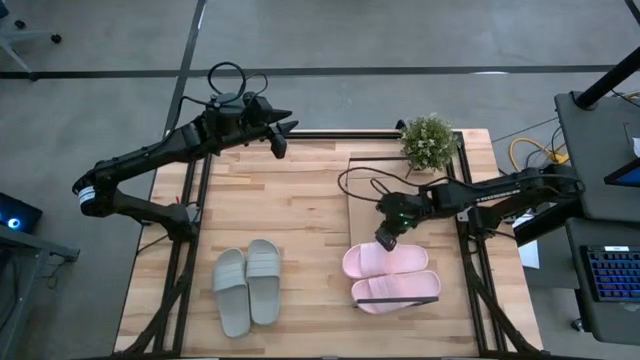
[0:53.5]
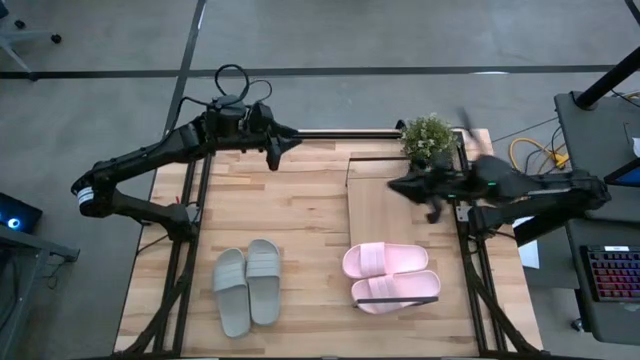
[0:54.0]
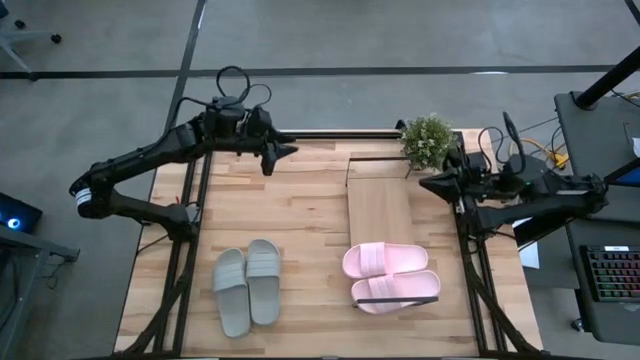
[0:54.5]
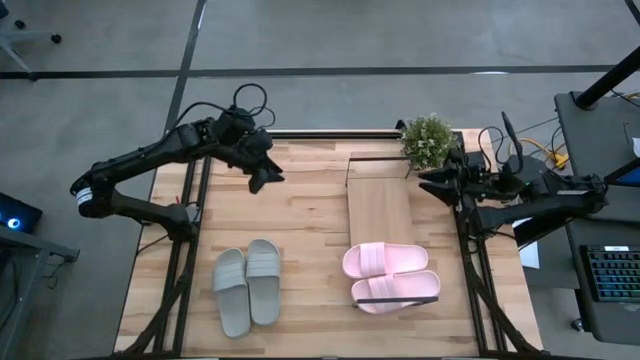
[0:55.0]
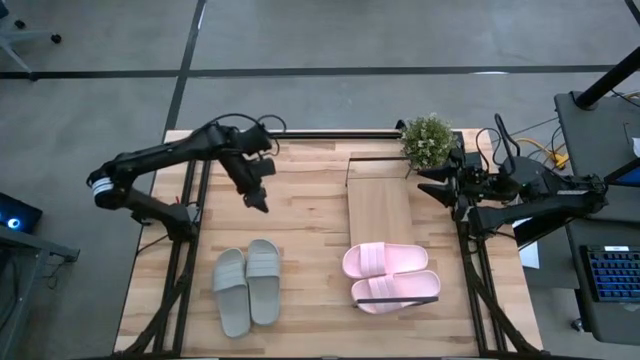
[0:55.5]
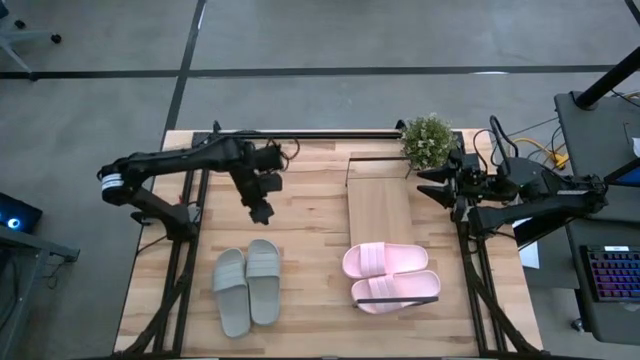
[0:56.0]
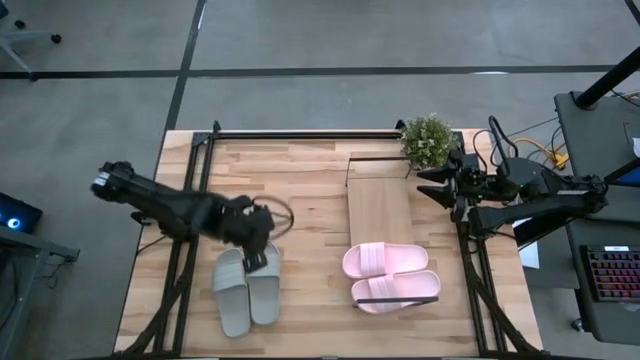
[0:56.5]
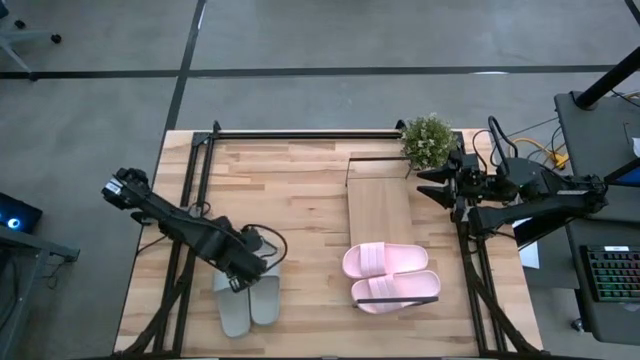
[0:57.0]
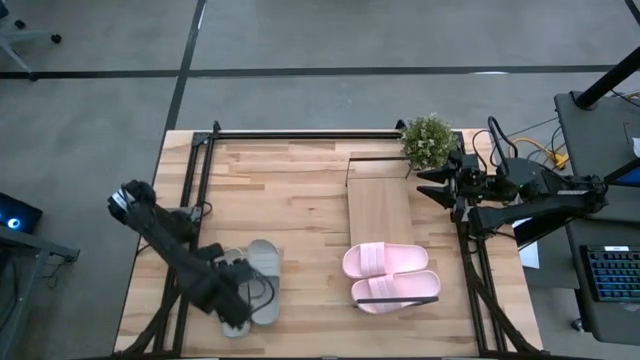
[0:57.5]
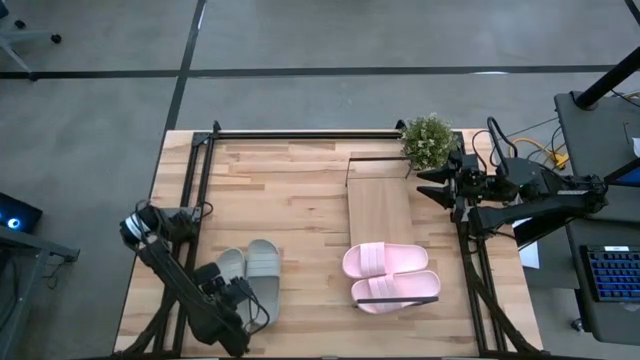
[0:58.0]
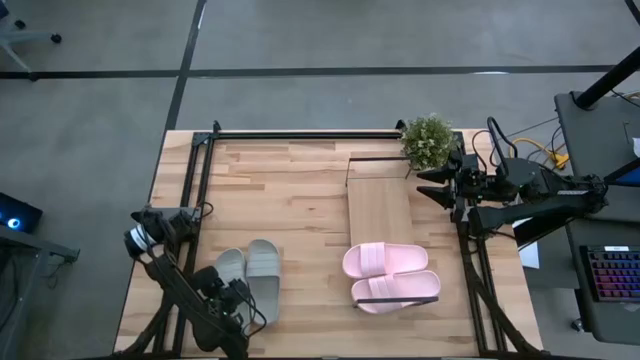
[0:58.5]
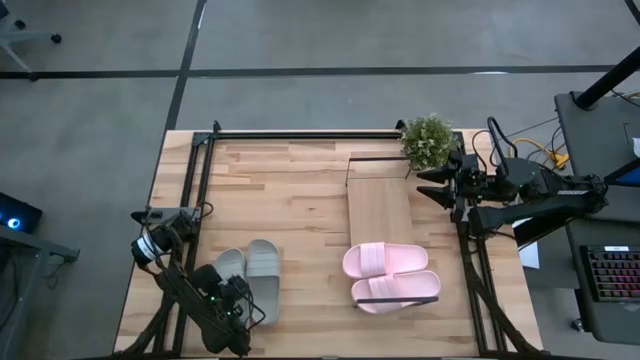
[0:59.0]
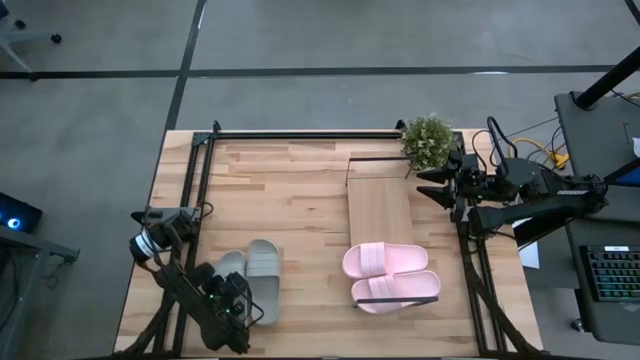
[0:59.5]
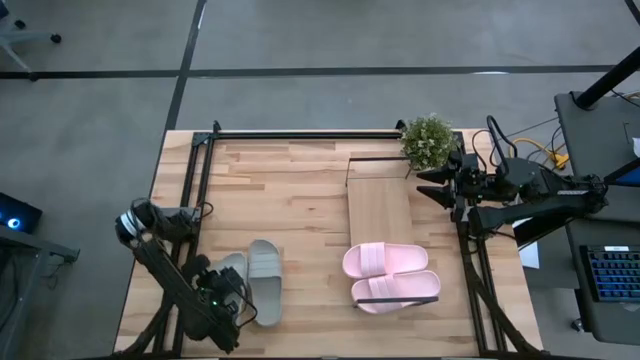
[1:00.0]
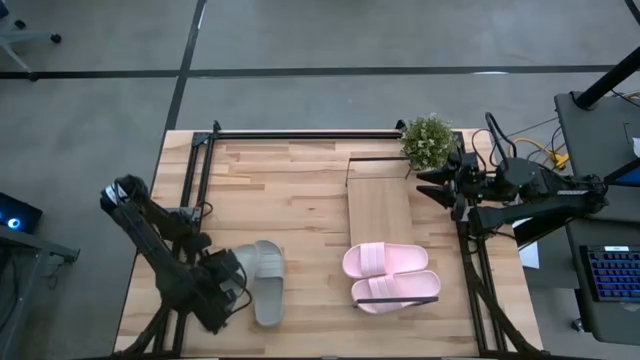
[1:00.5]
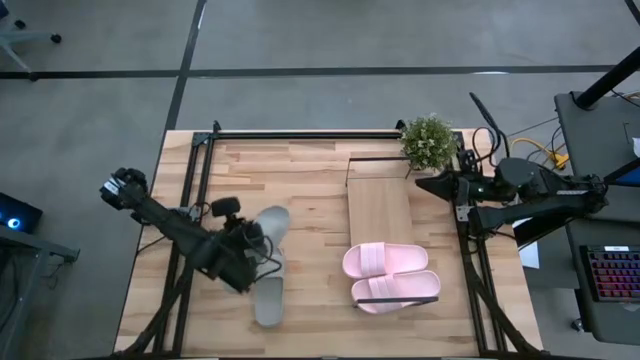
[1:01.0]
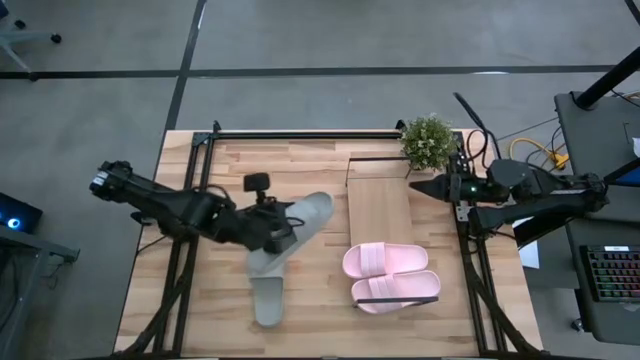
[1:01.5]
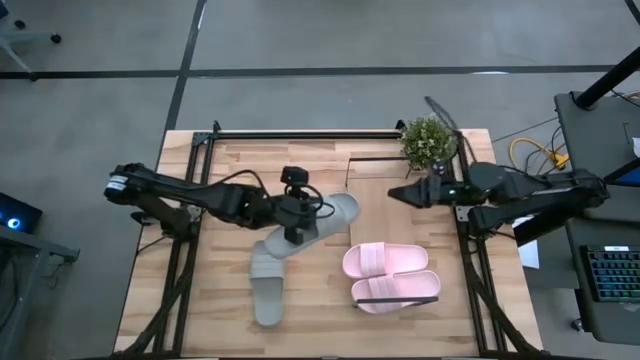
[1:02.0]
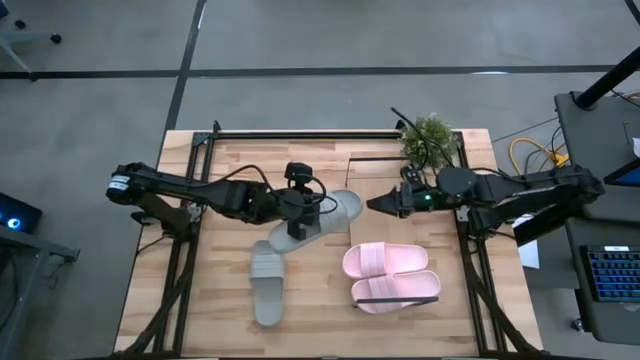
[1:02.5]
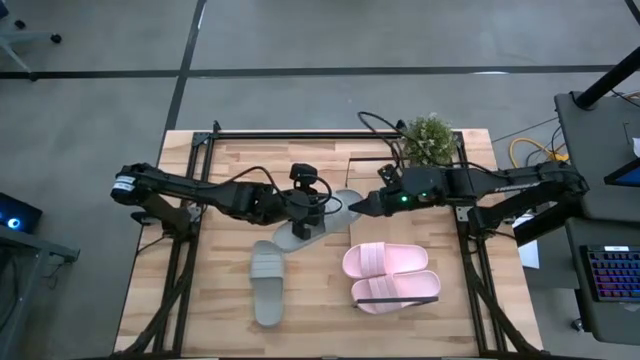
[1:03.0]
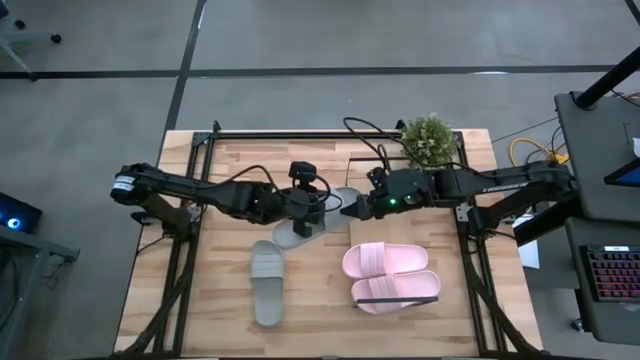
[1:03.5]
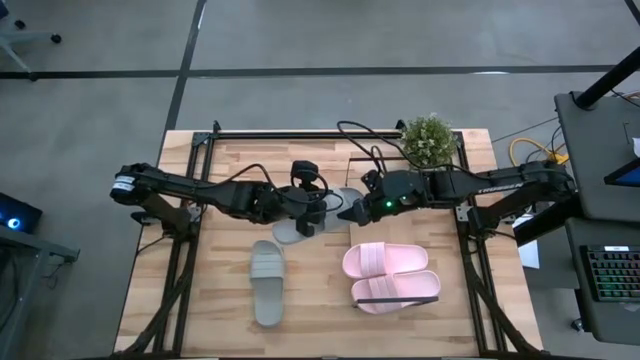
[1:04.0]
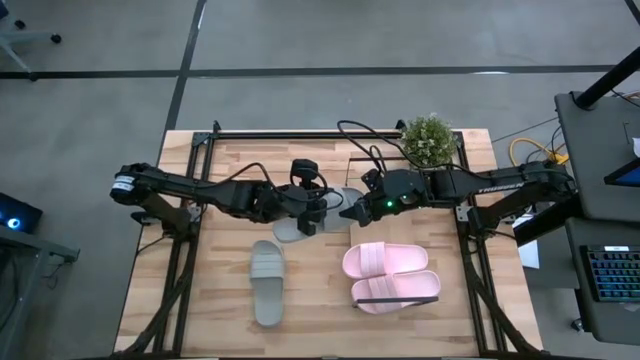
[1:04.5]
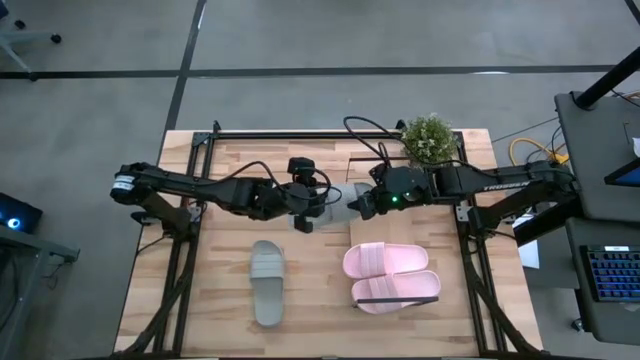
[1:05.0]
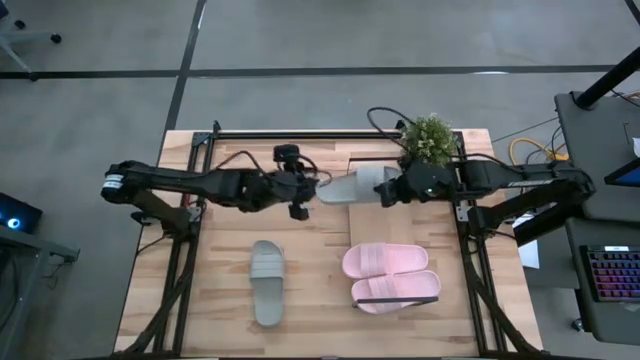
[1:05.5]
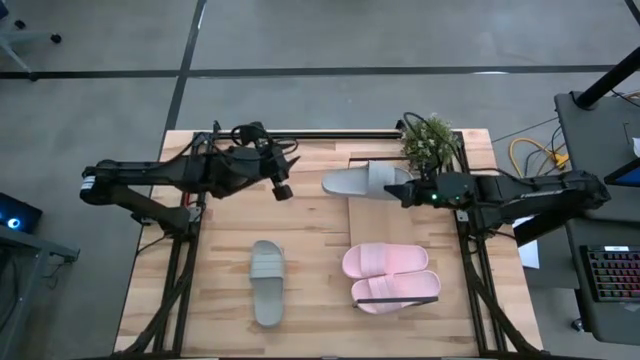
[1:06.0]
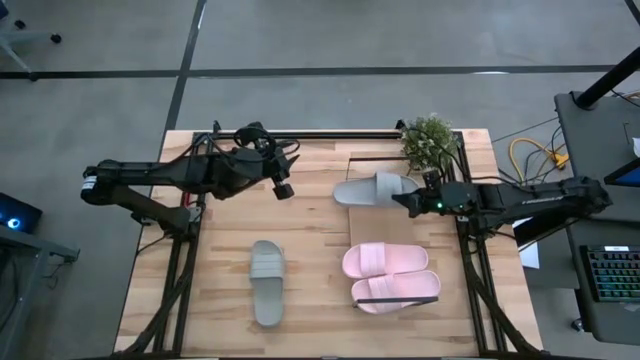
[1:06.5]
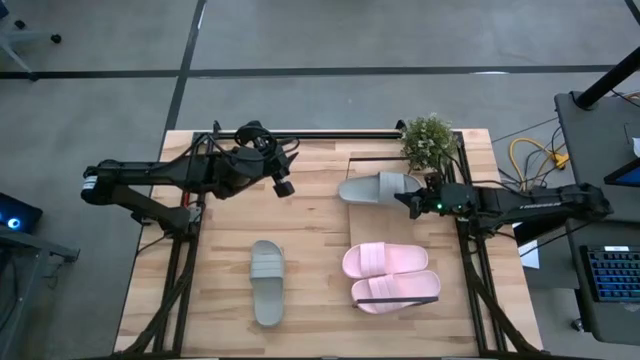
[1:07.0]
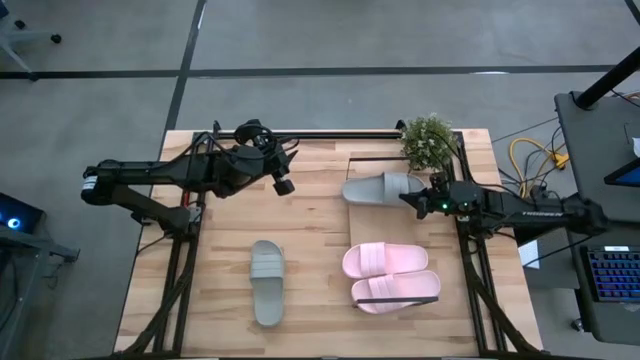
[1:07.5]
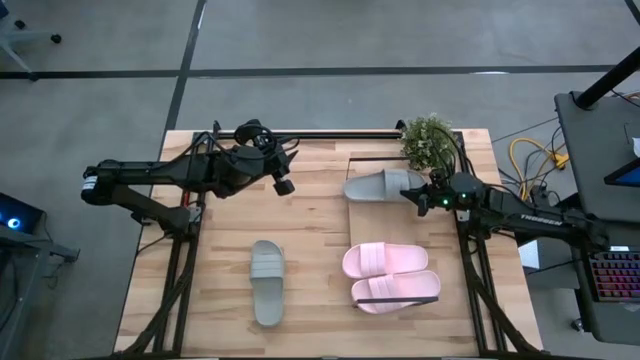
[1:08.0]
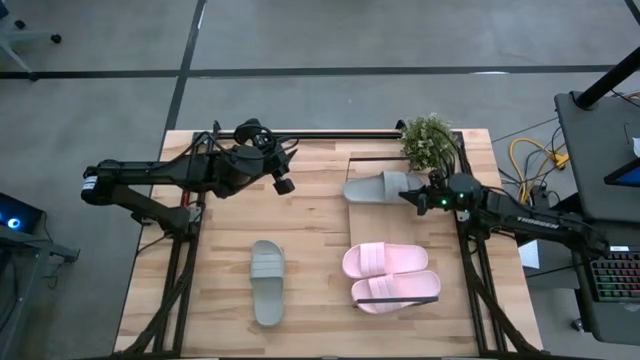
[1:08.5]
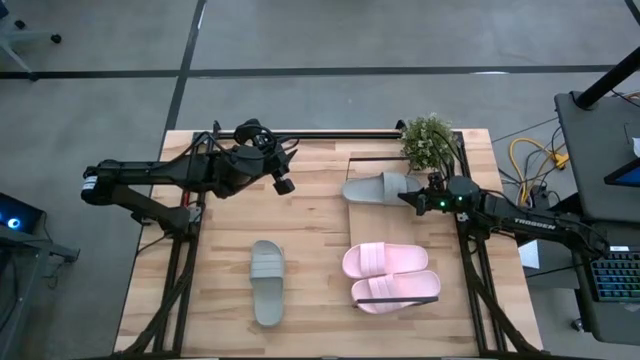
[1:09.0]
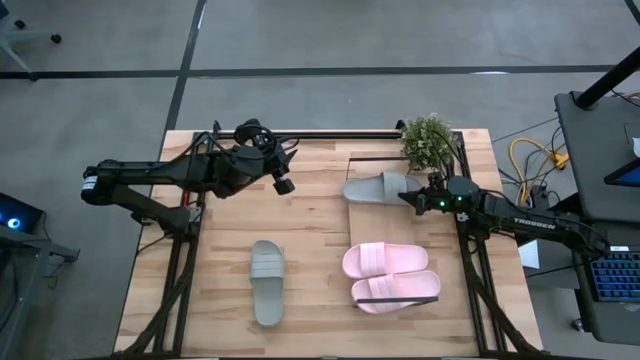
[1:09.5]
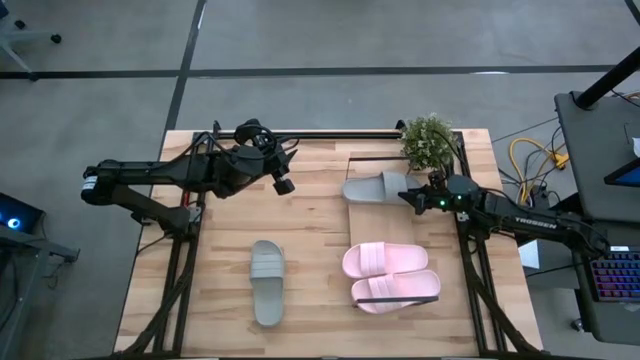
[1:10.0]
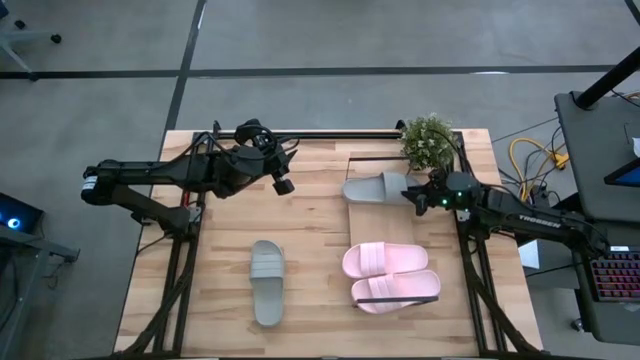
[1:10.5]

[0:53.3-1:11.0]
Task: Pick and place slides into the shelf
Put the left gray slide on the shelf

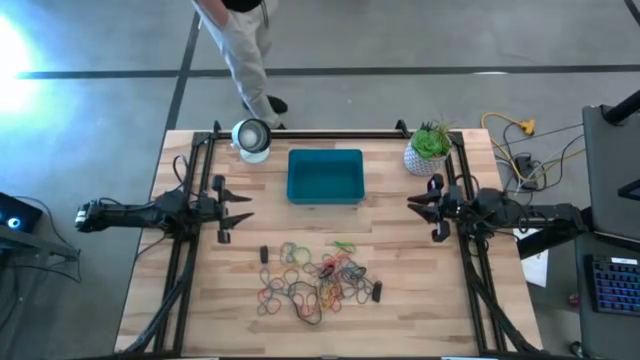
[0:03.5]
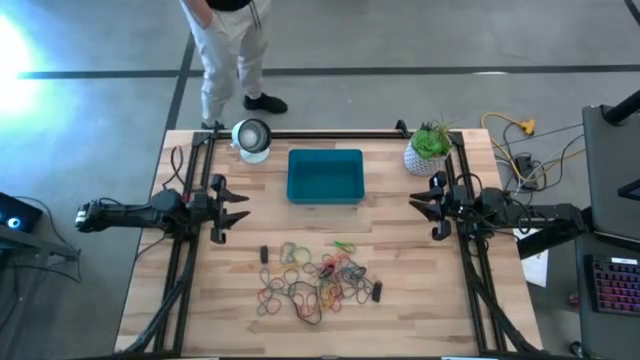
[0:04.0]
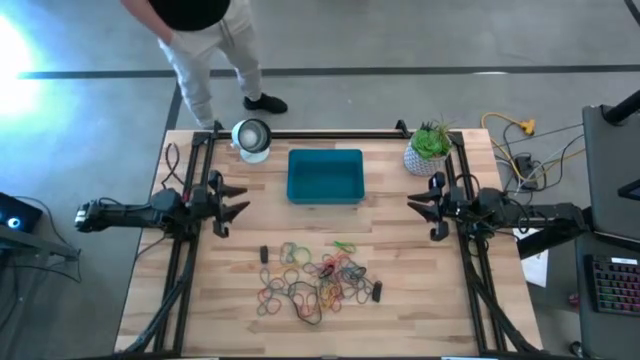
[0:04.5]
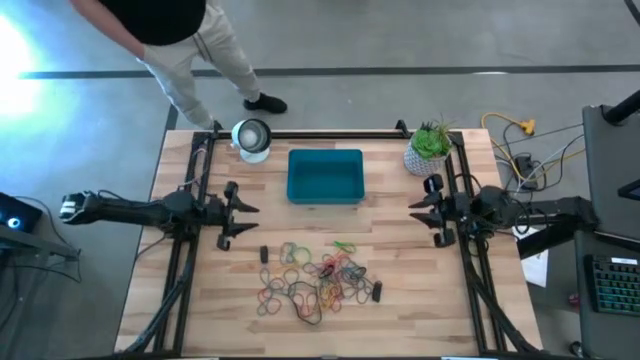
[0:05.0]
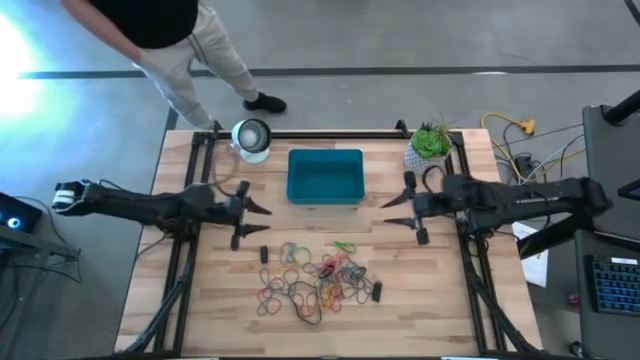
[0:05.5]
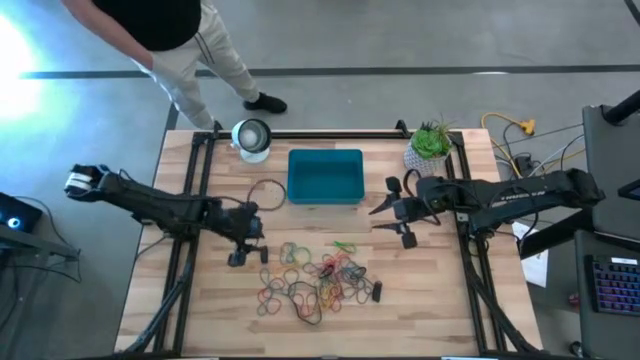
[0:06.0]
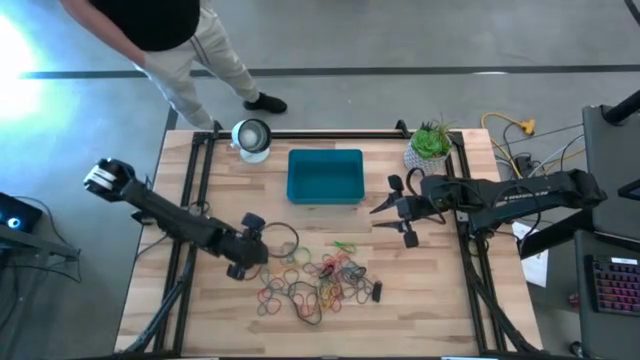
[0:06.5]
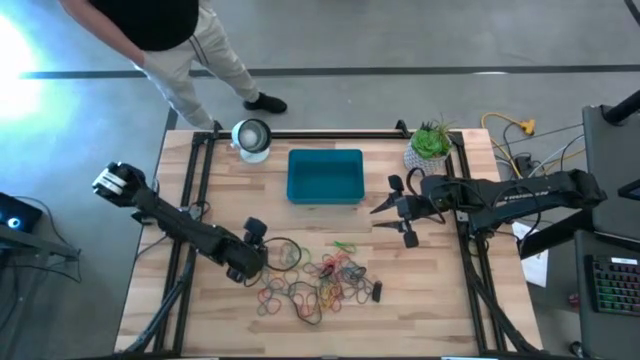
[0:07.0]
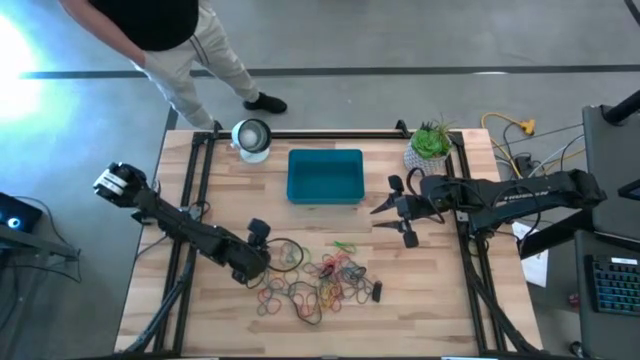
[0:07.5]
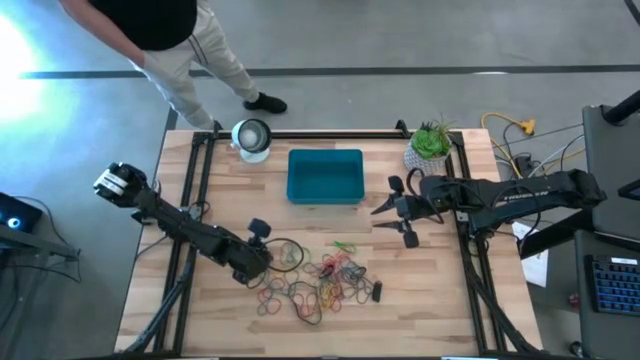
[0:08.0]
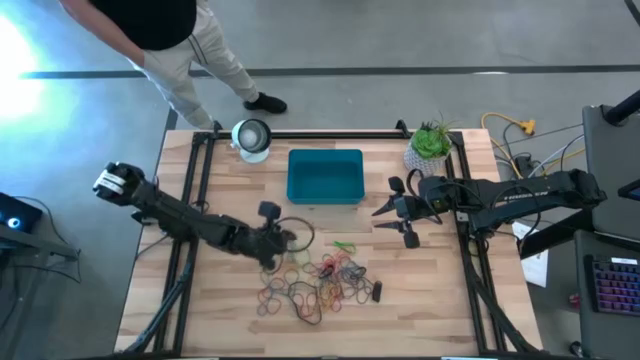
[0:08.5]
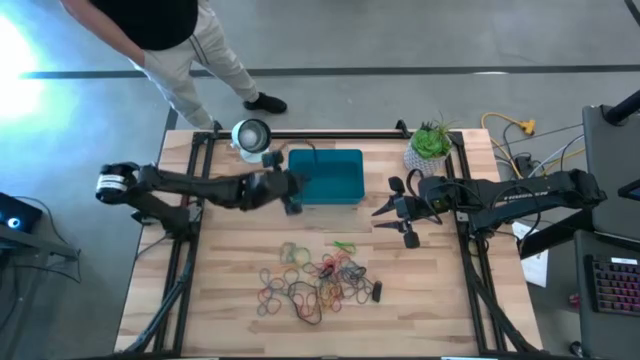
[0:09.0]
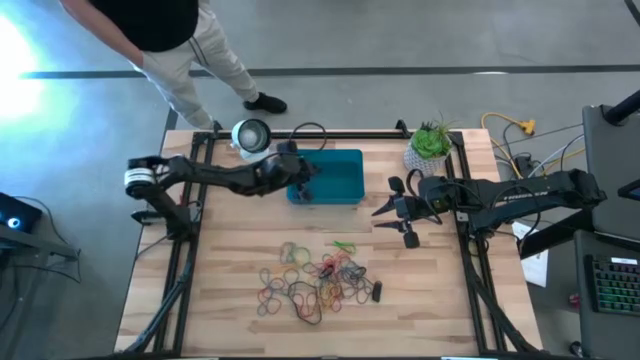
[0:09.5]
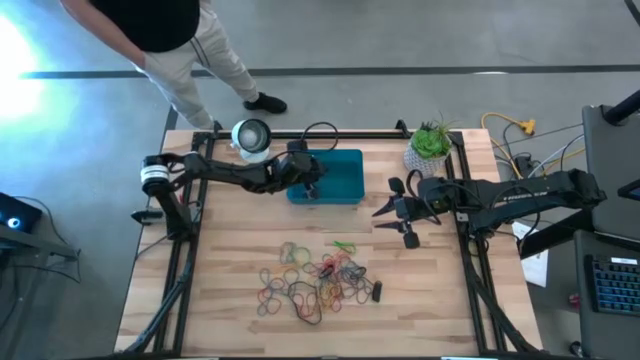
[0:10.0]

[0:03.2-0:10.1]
Task: Pick and place rubber bands into bin
Put the black rubber band into the bin
